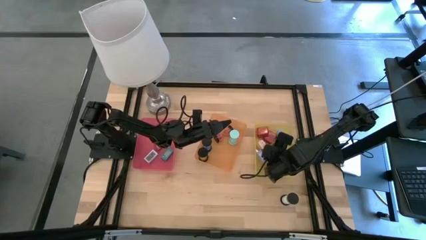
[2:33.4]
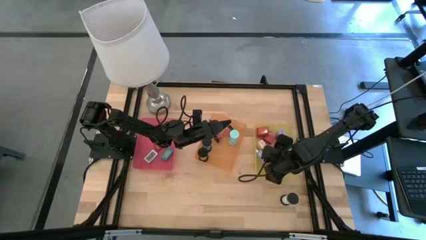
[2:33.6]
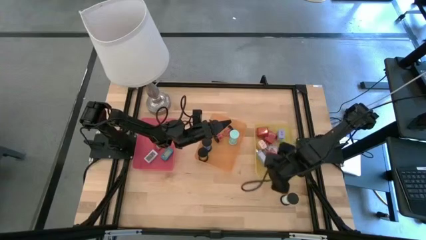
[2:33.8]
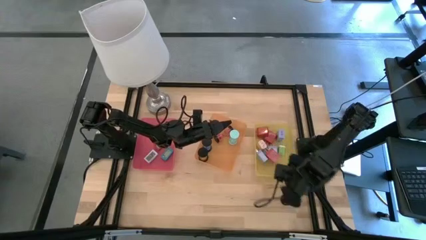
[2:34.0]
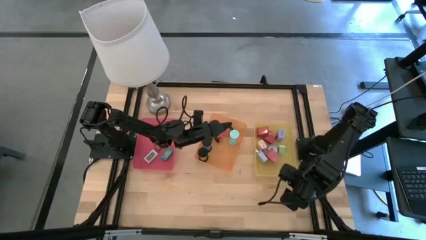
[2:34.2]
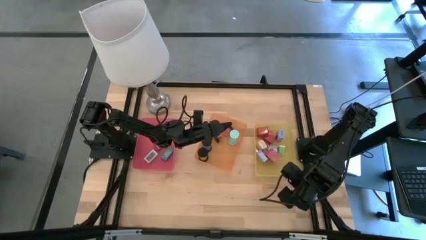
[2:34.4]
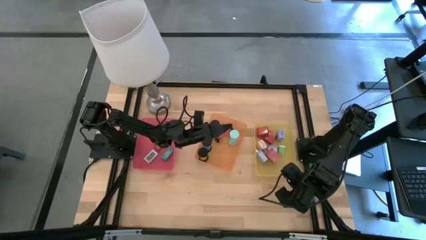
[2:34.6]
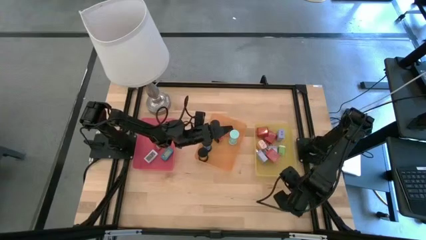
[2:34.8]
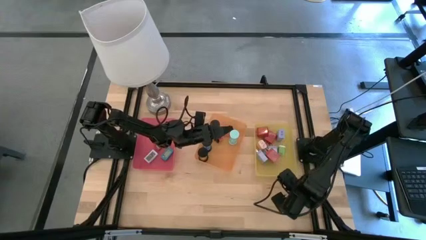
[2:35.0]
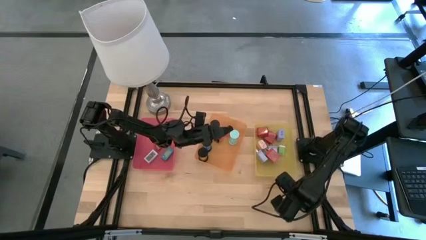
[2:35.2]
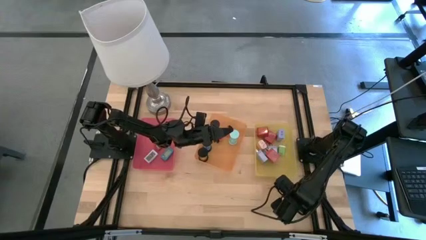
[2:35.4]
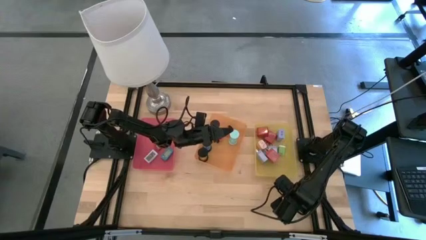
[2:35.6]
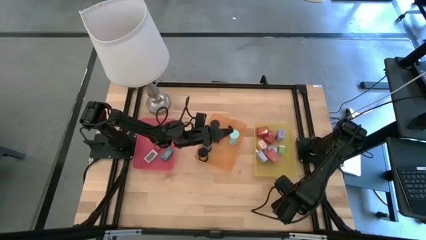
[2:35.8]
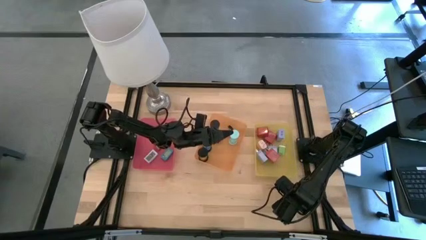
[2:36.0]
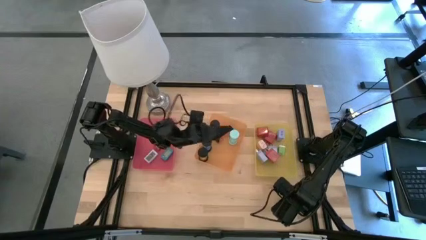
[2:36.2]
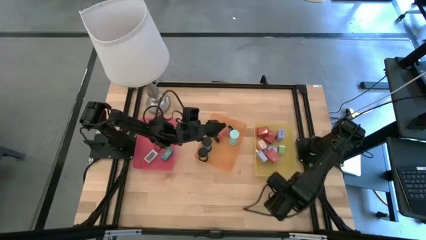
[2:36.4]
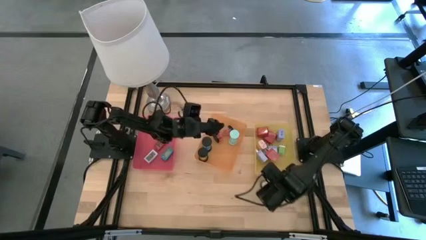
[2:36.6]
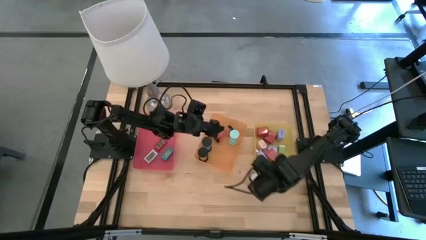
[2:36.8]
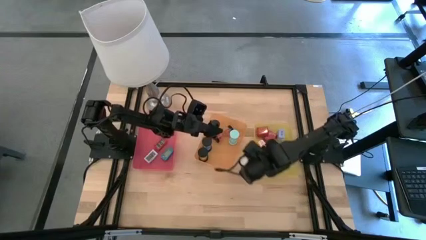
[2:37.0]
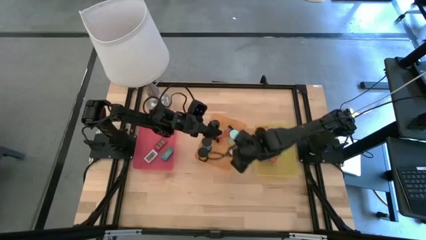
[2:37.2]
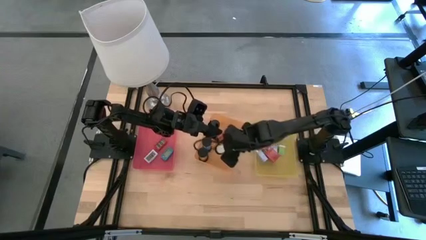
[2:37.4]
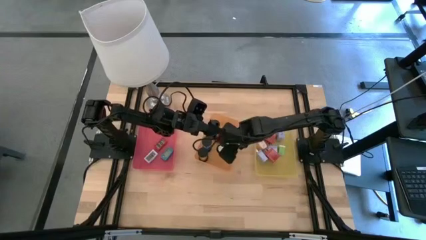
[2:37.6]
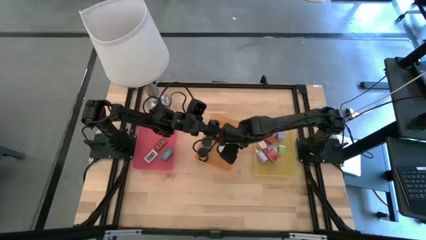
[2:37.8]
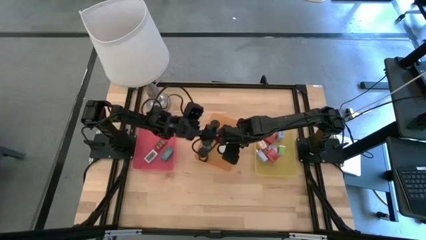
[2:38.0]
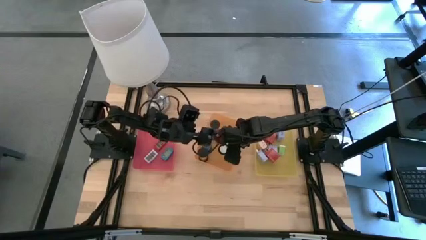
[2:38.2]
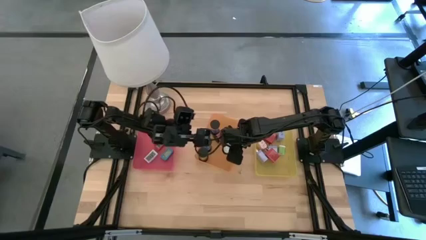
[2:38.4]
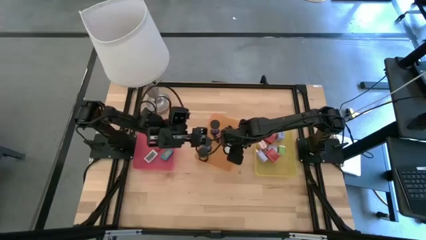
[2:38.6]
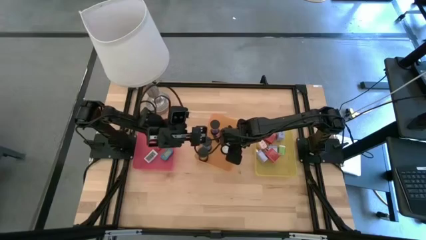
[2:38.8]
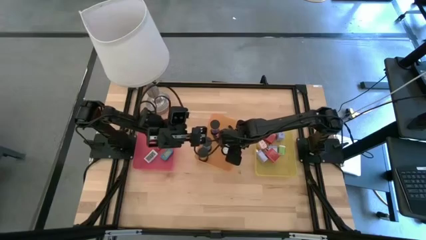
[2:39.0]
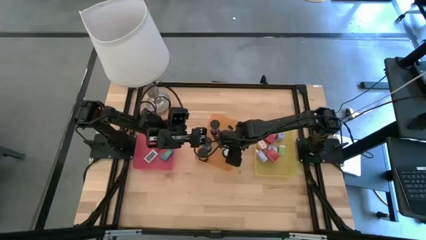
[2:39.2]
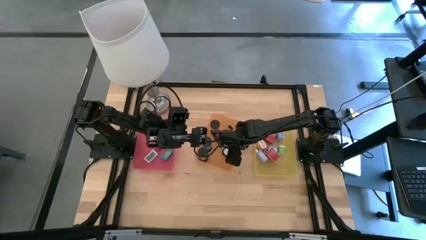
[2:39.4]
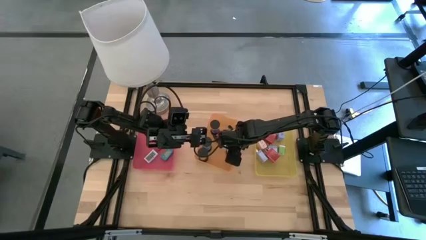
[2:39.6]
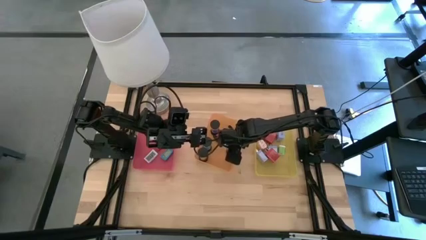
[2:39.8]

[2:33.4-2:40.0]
Task: Pick & Place Office items
Put the white hourglass into the yellow bin

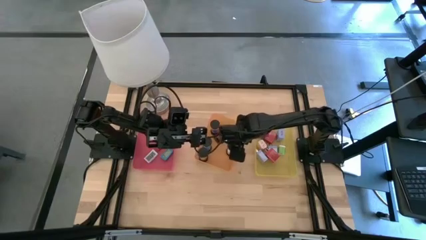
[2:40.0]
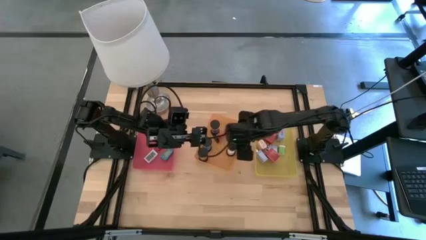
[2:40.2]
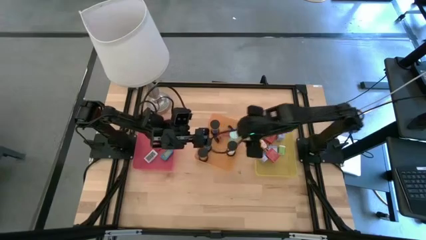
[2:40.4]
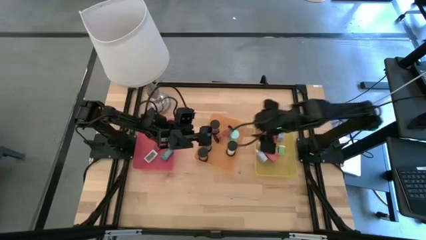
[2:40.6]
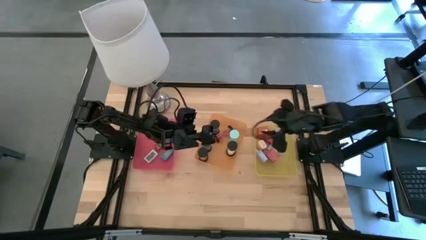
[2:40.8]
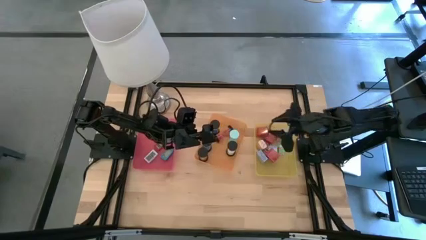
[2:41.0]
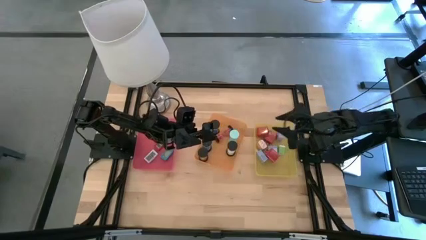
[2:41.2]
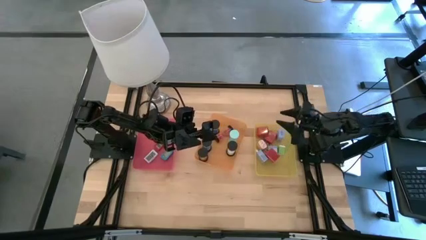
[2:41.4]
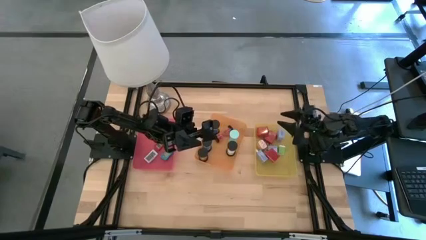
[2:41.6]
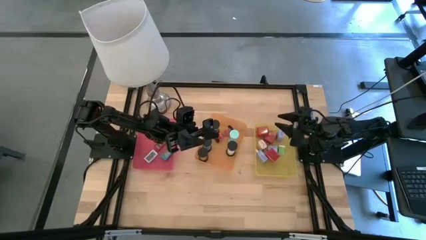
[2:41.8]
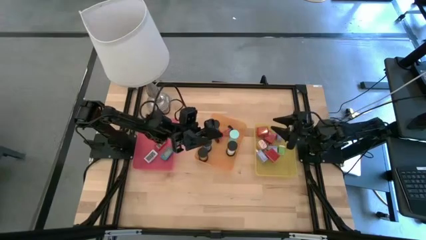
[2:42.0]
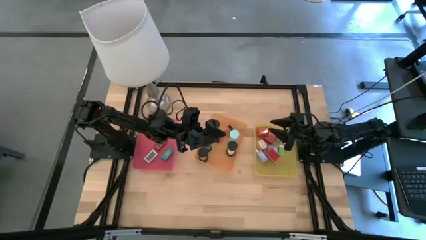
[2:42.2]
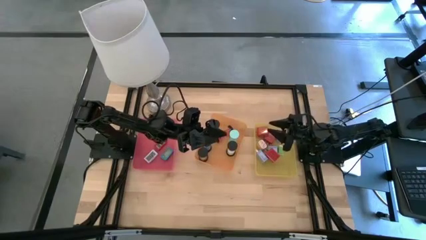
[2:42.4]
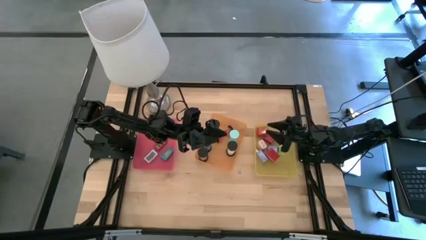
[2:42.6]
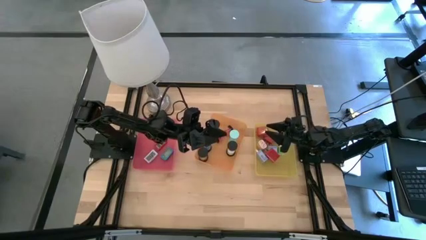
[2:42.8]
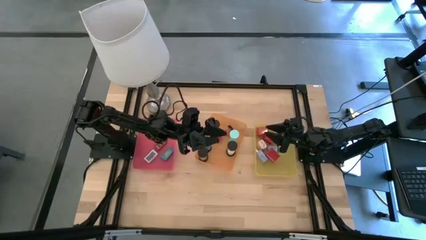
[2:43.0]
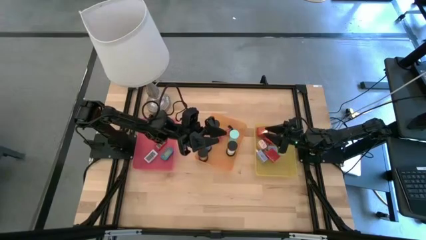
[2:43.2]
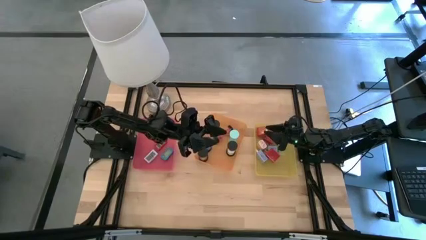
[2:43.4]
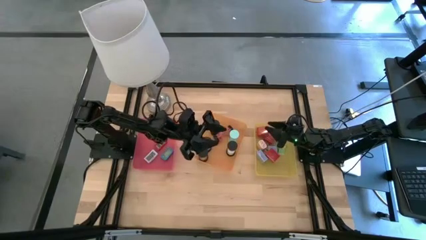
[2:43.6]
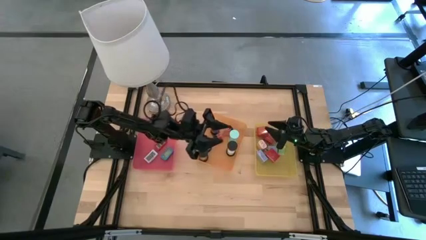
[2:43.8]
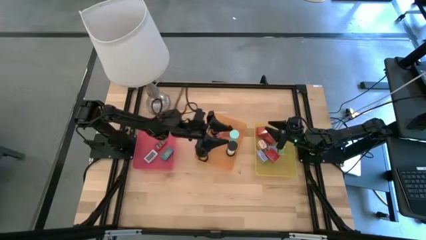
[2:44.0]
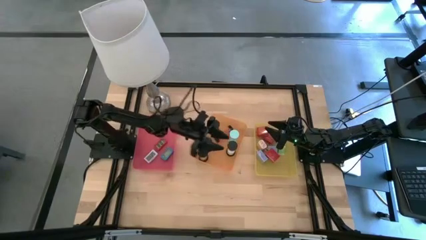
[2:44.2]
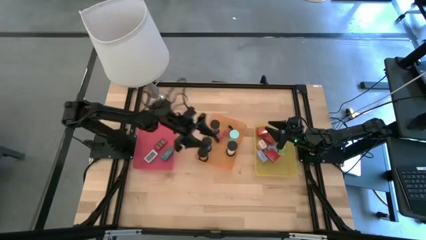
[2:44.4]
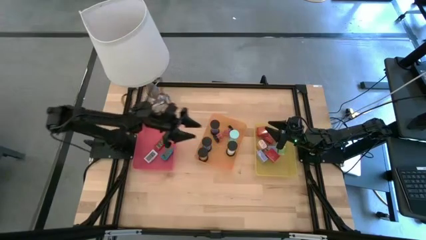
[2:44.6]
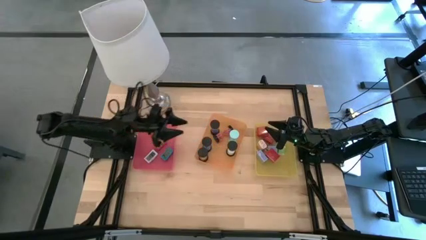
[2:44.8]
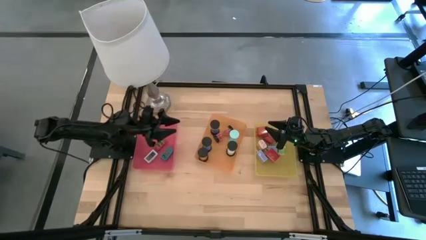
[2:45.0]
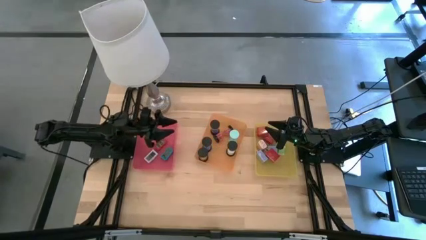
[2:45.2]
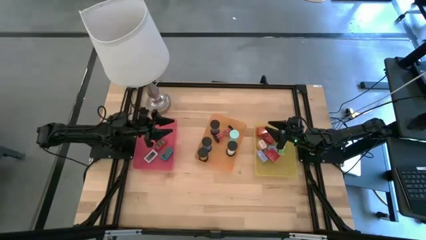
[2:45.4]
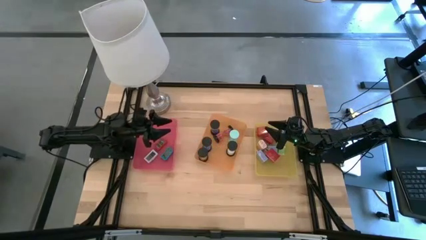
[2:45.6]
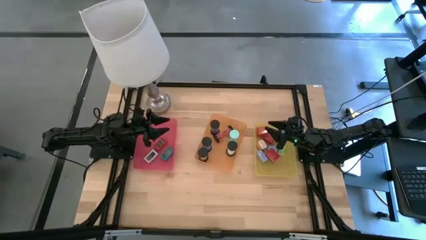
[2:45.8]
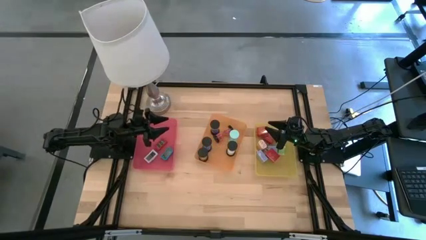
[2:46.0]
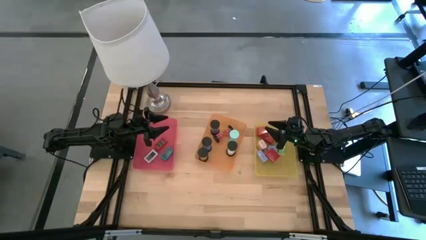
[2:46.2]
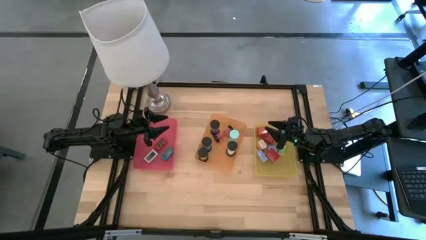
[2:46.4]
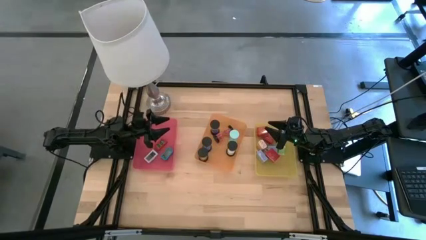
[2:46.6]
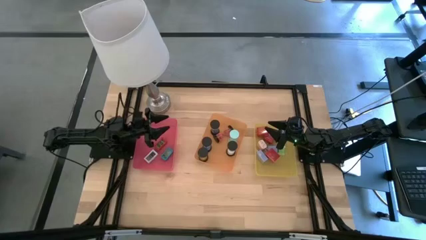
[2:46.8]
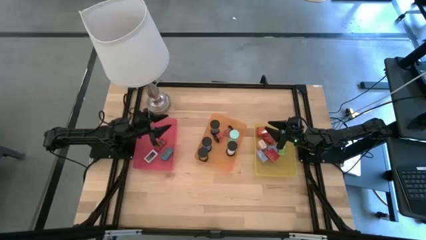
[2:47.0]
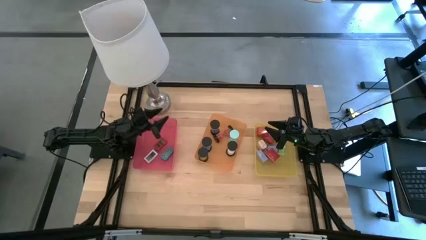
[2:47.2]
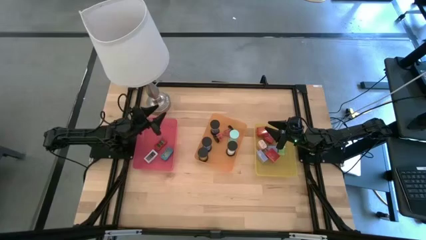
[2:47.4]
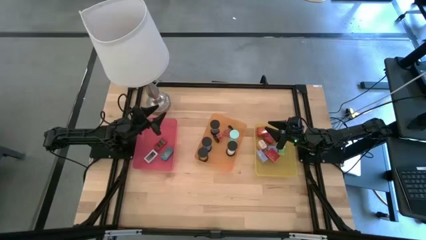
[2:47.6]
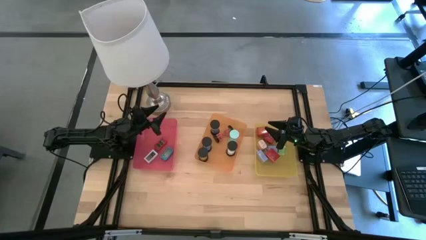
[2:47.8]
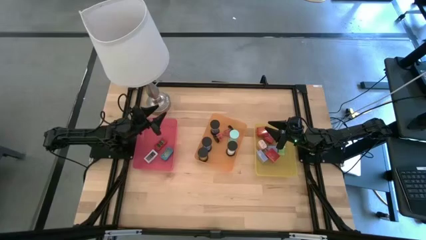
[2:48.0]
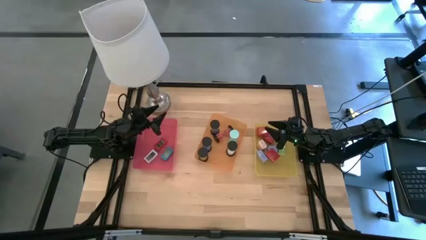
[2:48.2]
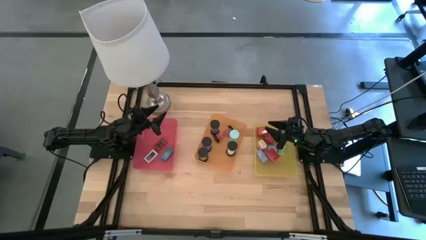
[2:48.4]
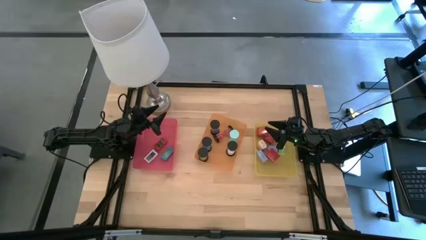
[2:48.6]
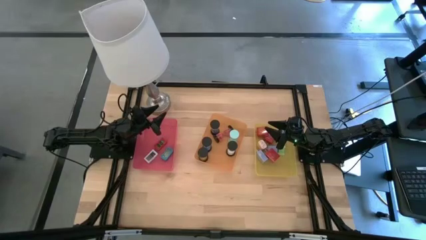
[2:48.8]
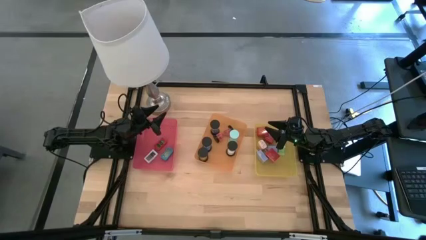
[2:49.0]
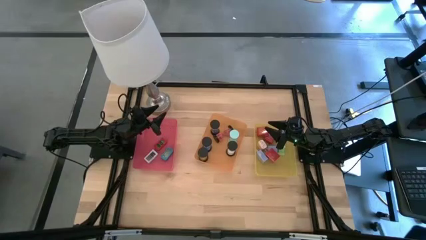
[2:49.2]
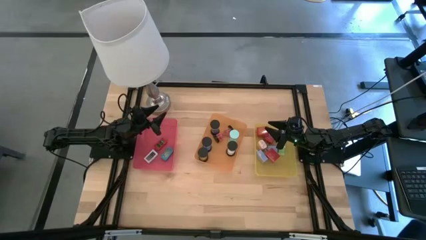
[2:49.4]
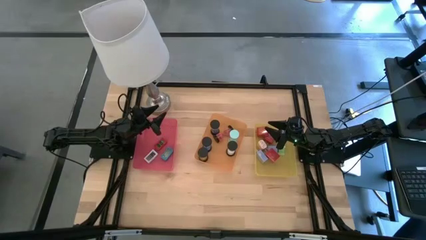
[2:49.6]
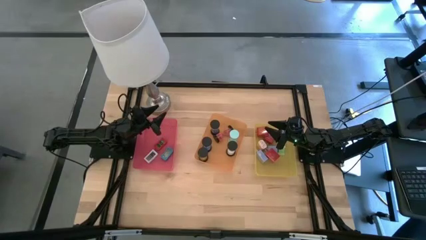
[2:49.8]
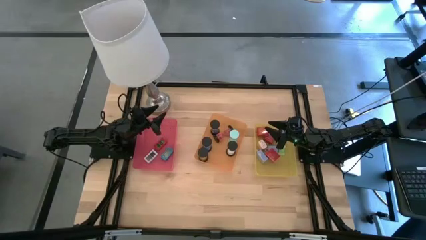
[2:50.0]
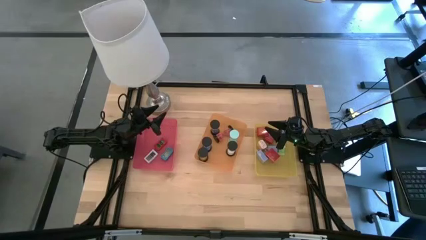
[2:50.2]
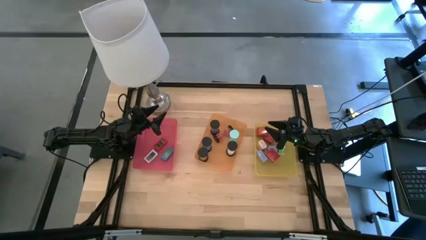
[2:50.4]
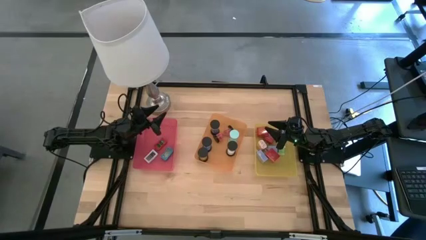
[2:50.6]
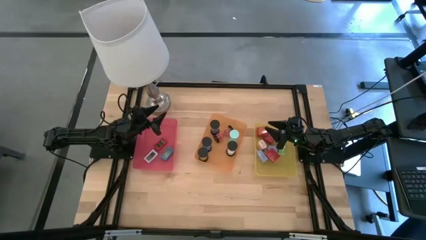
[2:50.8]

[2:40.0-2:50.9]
Return to Home Position
